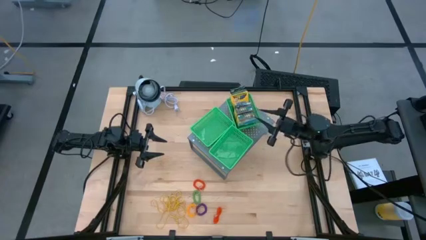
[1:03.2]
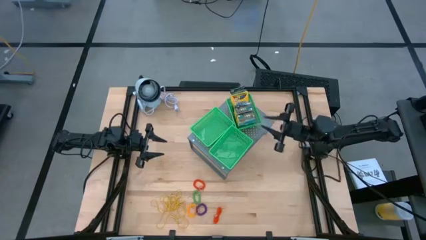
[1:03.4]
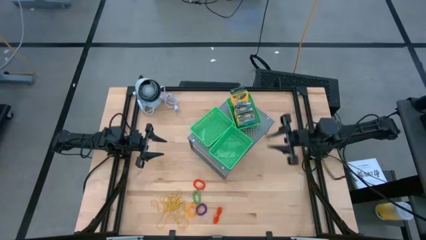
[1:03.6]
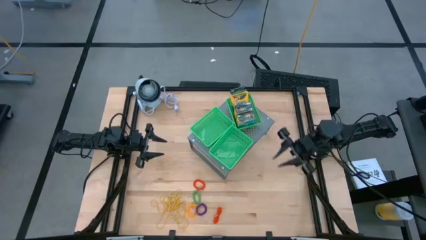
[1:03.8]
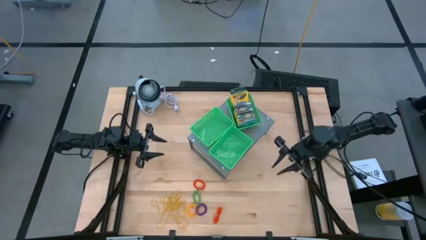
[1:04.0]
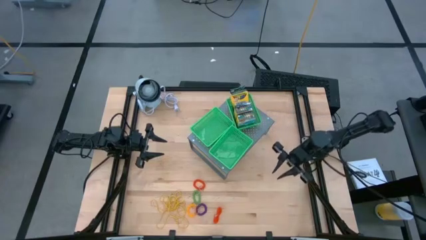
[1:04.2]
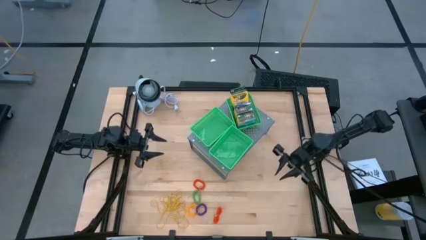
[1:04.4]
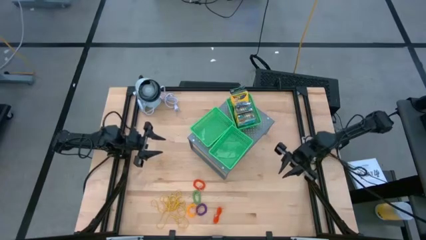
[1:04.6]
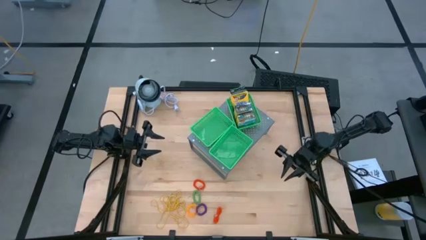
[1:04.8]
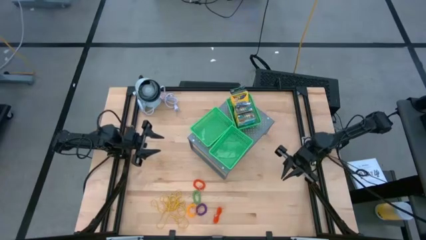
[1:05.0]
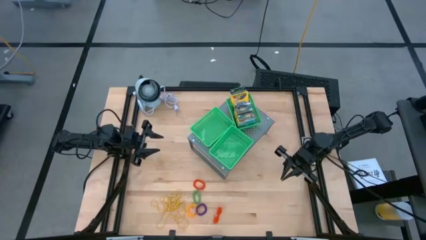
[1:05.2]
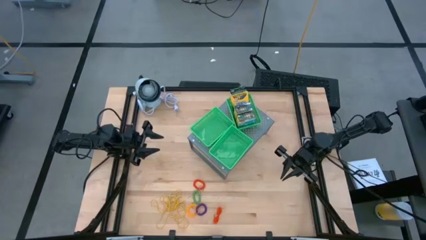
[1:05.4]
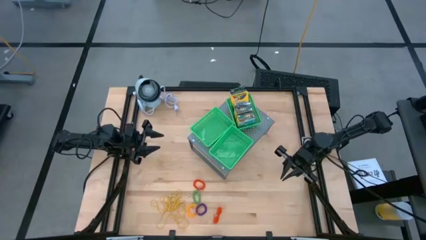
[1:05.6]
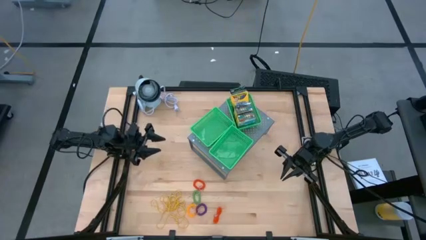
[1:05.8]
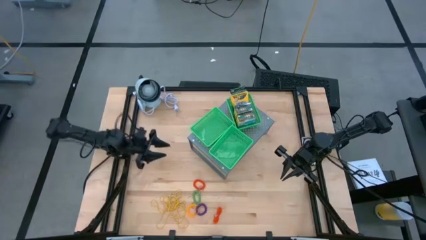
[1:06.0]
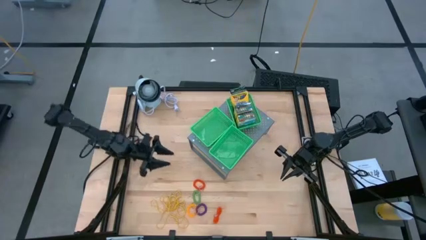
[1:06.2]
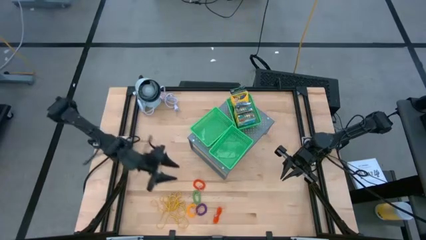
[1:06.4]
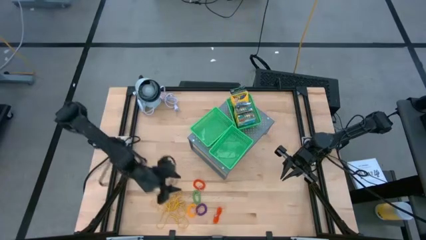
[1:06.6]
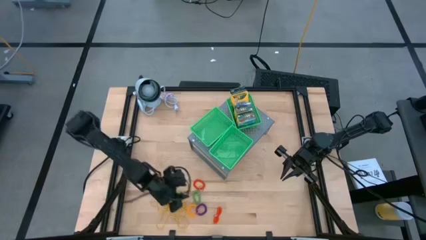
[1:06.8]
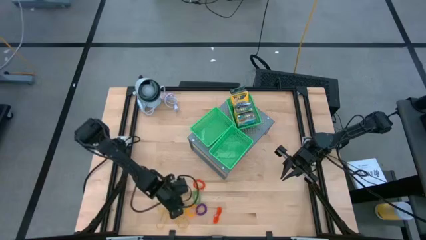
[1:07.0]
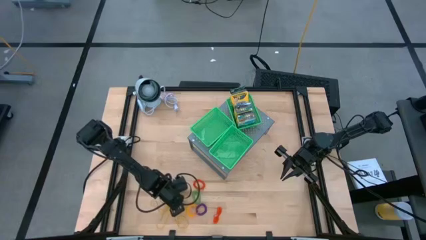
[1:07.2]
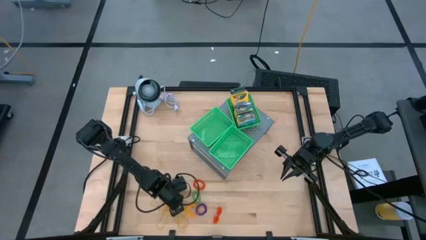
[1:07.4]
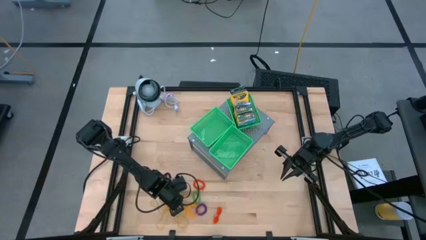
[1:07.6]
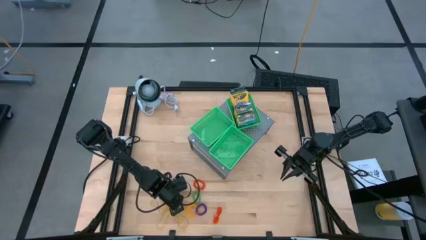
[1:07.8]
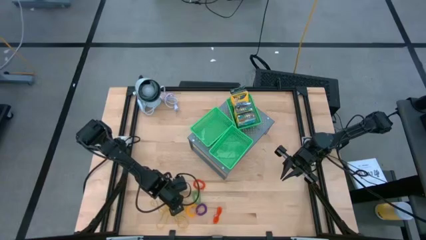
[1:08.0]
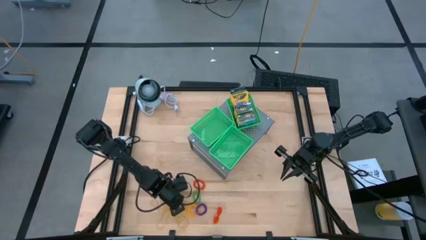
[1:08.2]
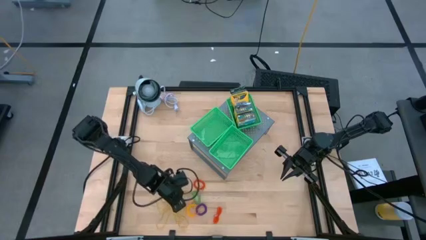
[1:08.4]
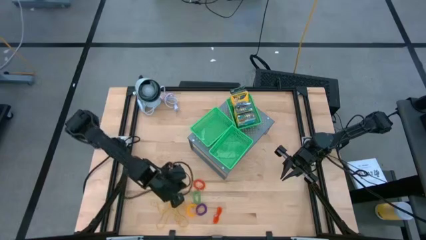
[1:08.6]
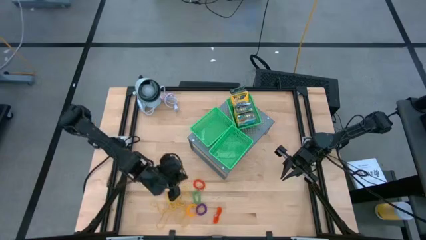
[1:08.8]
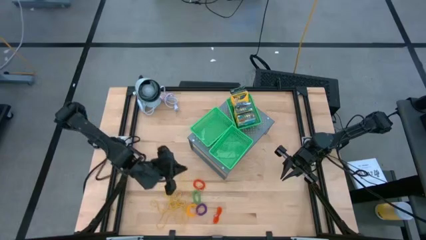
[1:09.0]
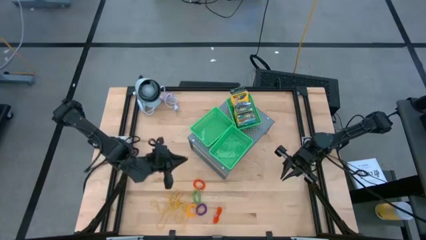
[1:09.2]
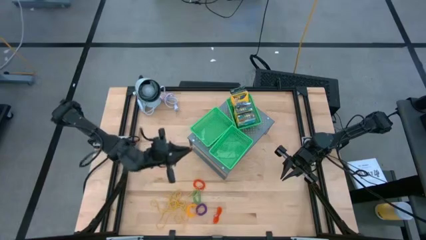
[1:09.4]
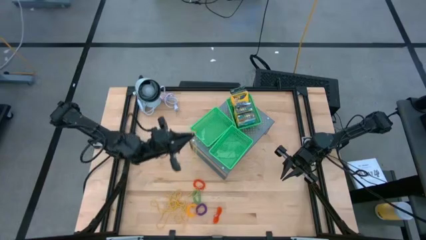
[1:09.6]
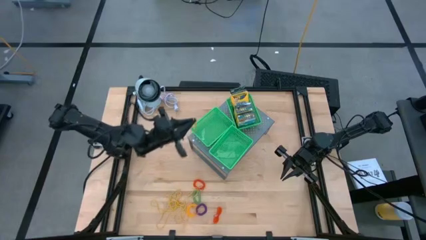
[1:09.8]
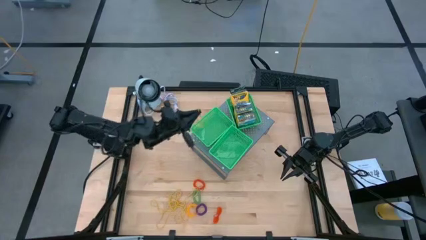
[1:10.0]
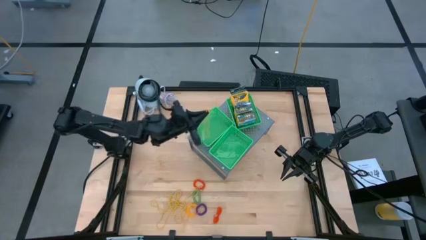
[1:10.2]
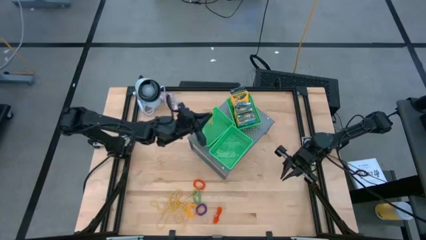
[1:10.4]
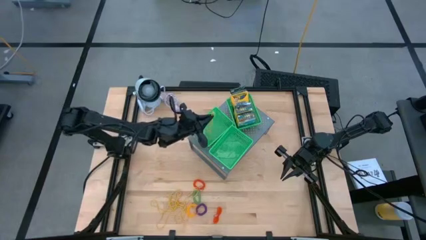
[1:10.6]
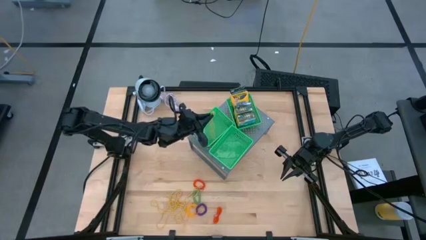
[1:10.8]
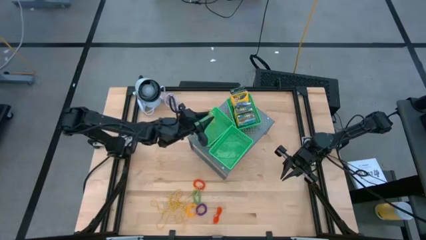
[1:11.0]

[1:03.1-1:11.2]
Task: Pick & Place Office Desk Supplies
Put the yellow rubber band into the top left green bin on the shelf

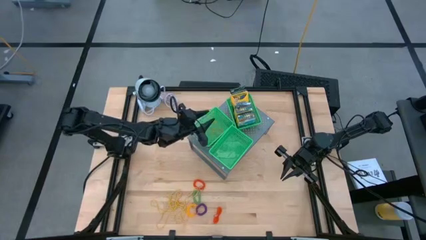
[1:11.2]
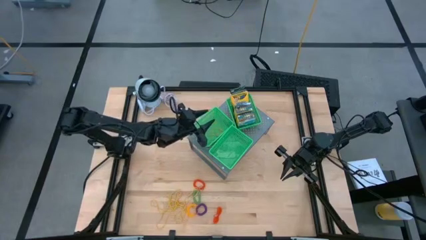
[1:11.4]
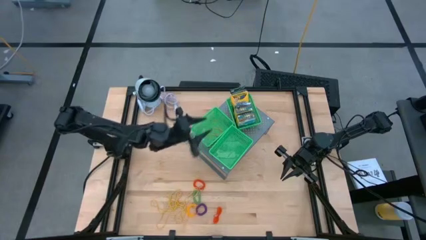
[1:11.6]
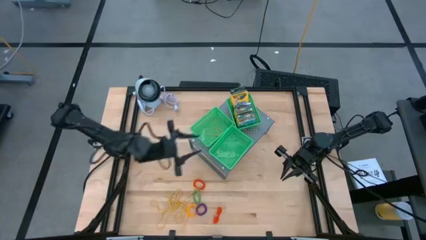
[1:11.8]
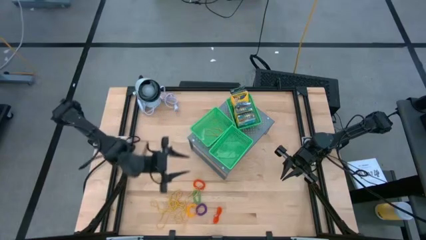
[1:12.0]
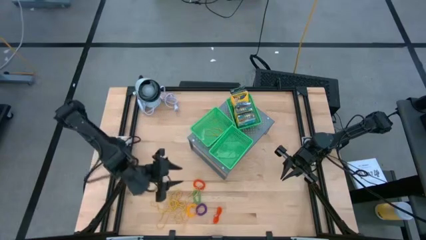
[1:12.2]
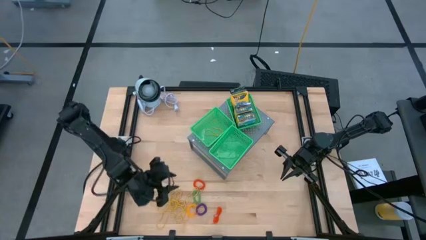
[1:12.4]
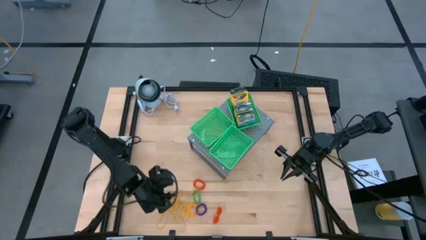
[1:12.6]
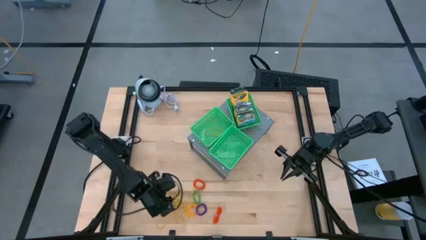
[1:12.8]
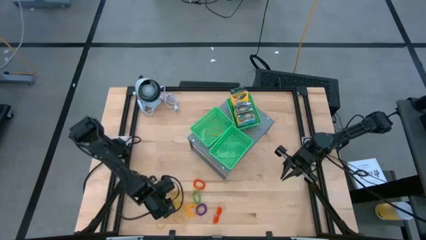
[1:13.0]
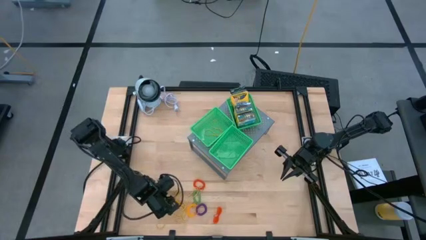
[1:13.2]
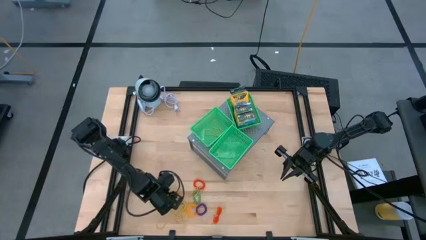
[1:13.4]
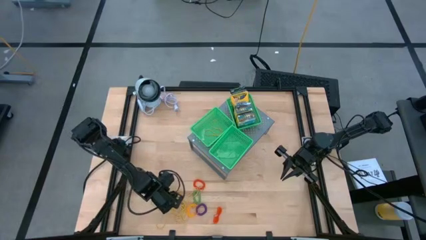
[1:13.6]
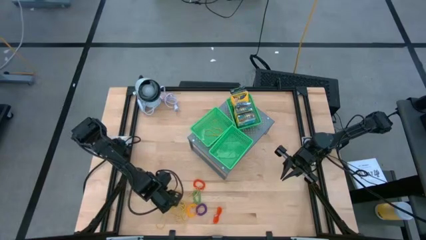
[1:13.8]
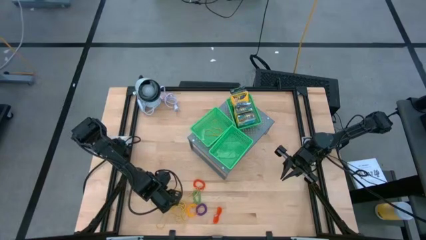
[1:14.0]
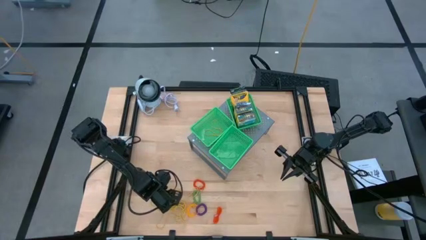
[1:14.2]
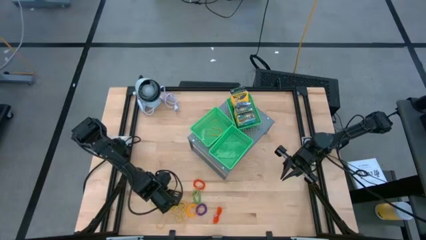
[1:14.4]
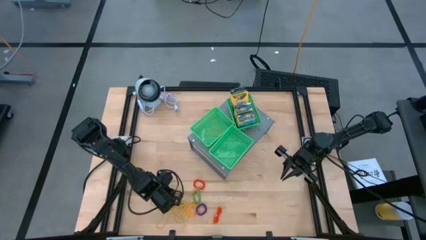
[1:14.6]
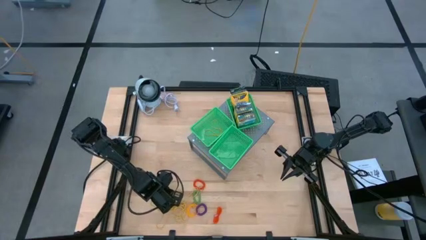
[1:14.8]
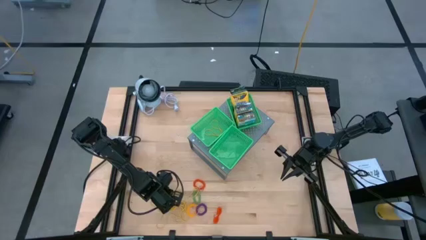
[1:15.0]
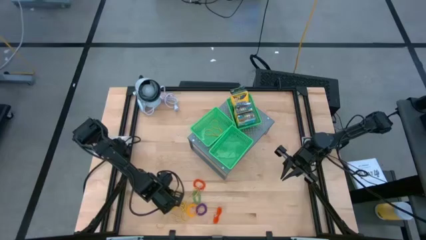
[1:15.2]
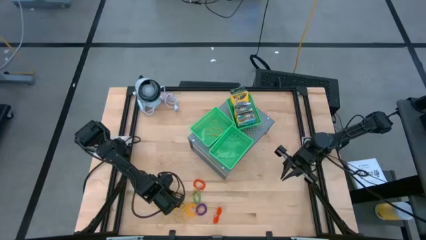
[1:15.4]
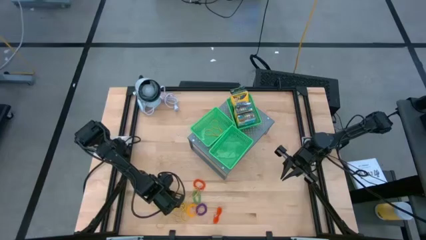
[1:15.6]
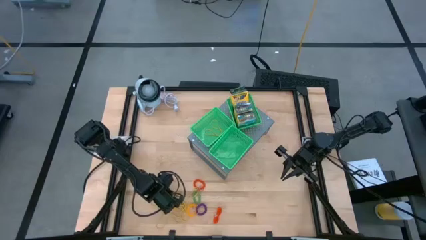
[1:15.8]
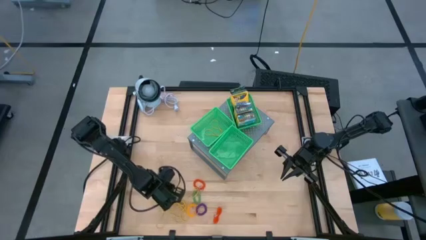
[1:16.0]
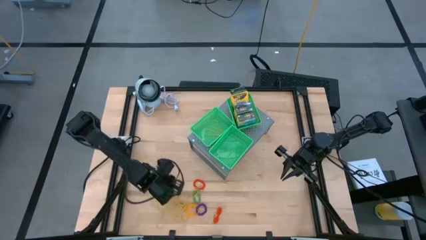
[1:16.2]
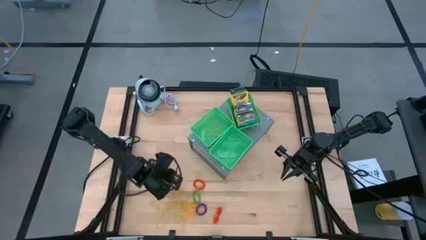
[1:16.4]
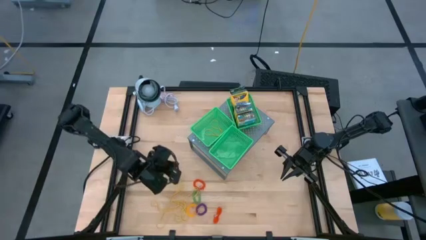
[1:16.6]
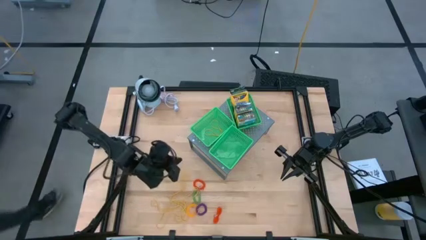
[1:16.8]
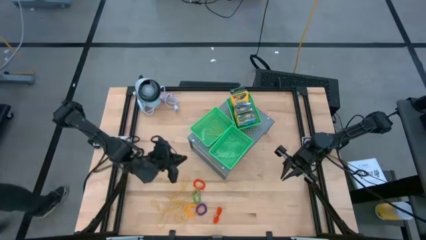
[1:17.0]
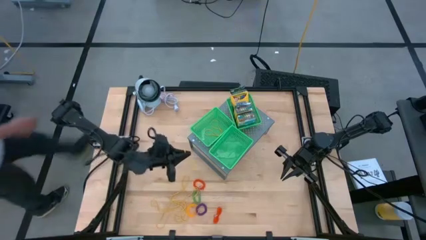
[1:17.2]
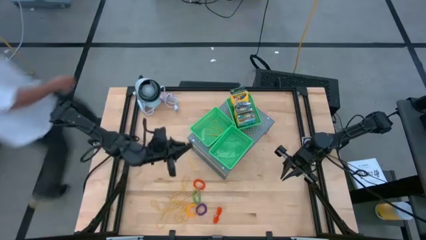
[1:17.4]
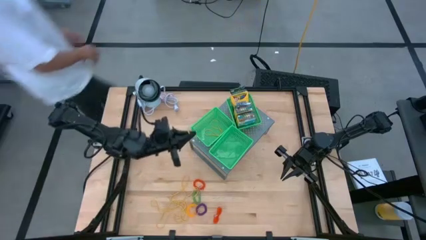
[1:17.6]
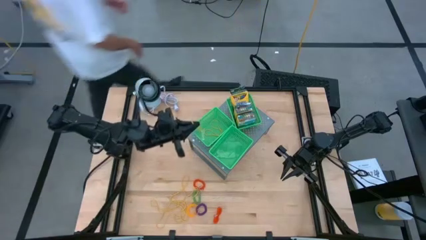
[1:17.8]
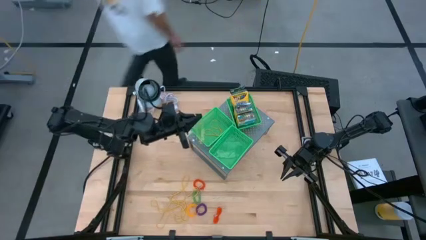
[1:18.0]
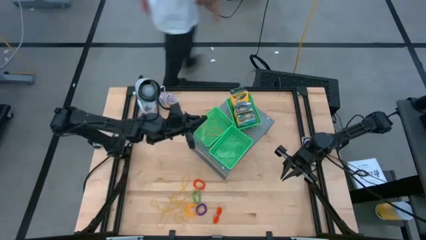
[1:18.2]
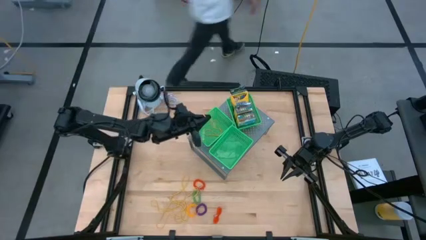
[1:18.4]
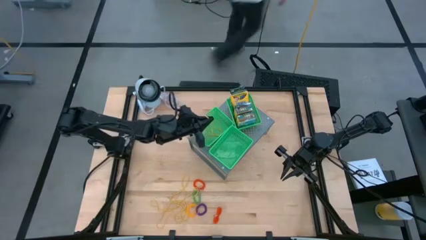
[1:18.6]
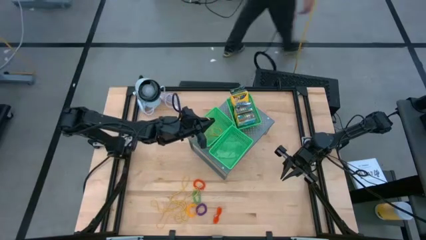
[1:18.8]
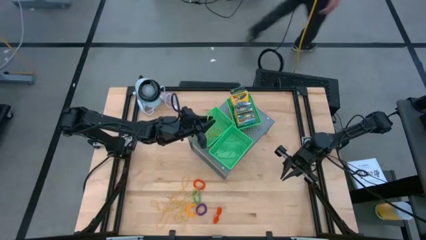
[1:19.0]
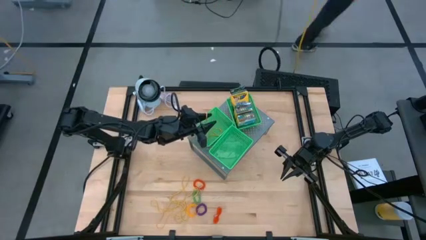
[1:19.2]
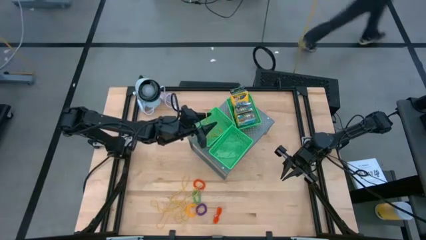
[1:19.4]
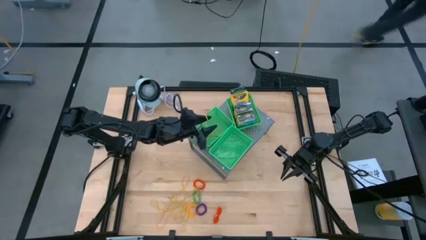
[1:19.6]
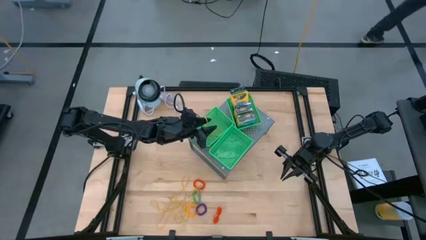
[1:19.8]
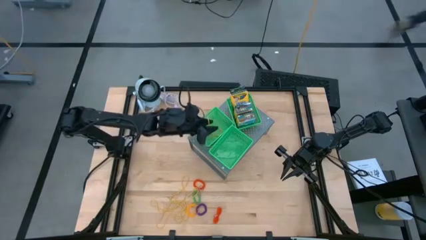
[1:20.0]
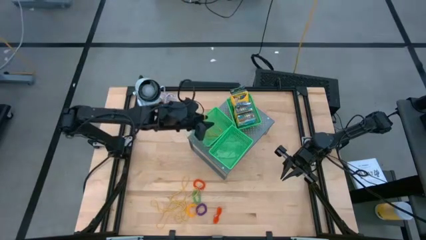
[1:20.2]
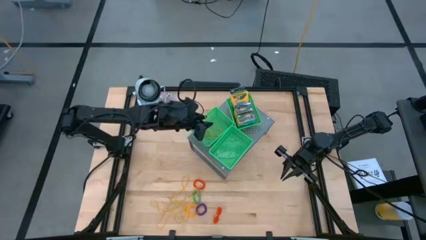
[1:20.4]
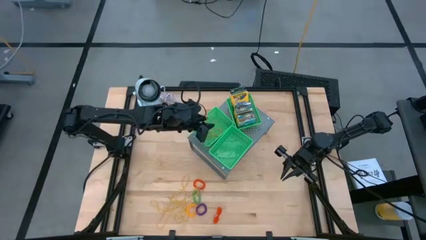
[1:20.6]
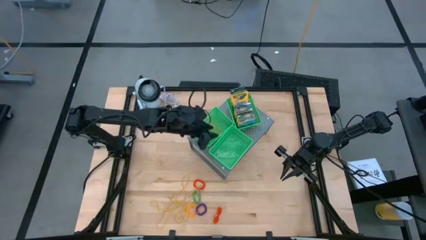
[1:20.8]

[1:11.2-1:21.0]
Put the yellow rubber band into the top left green bin on the shelf
